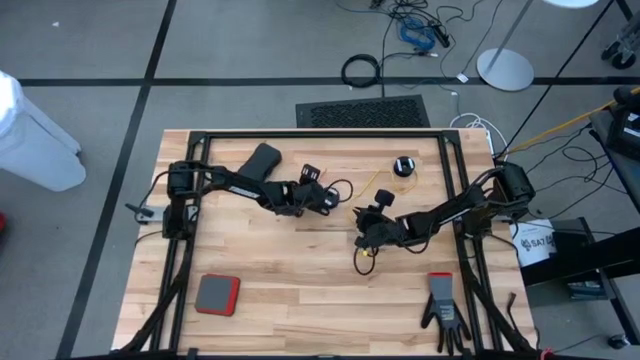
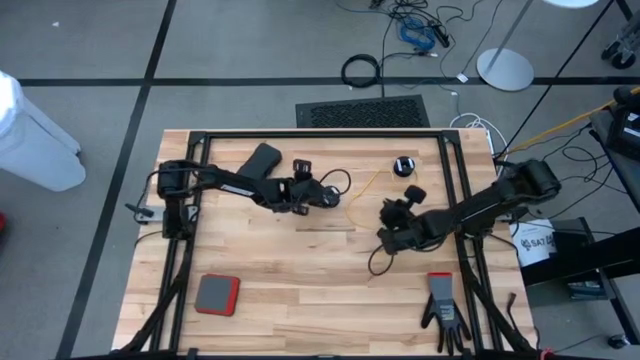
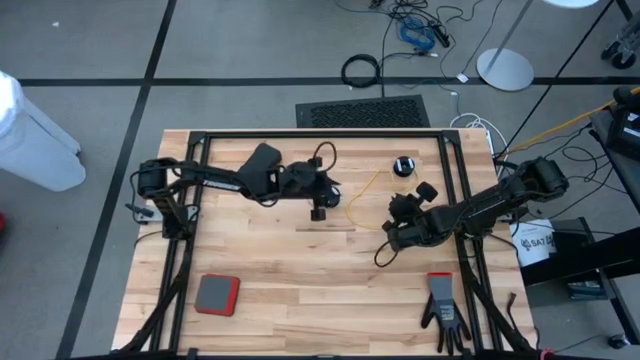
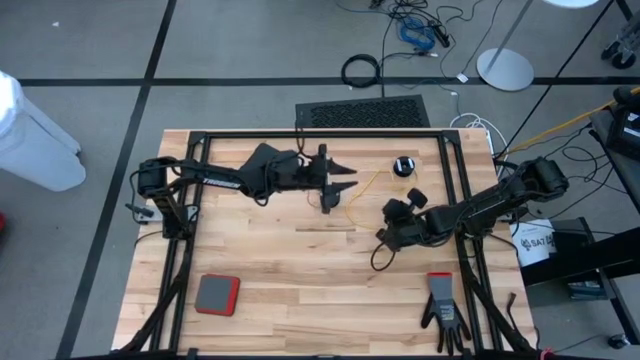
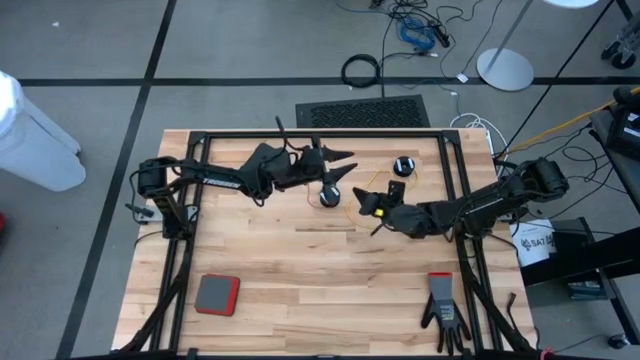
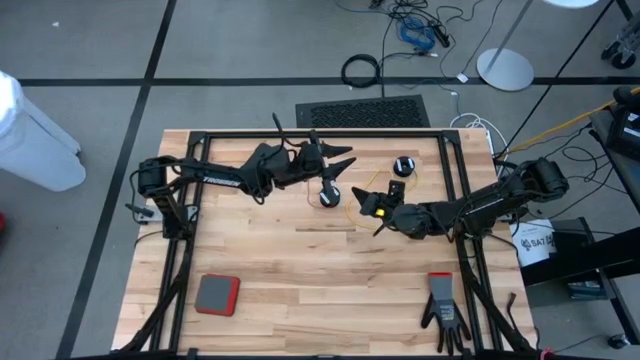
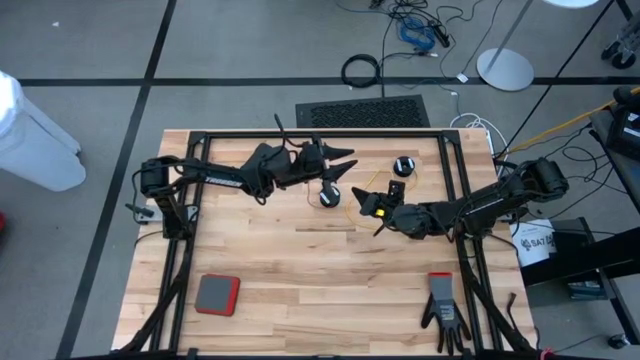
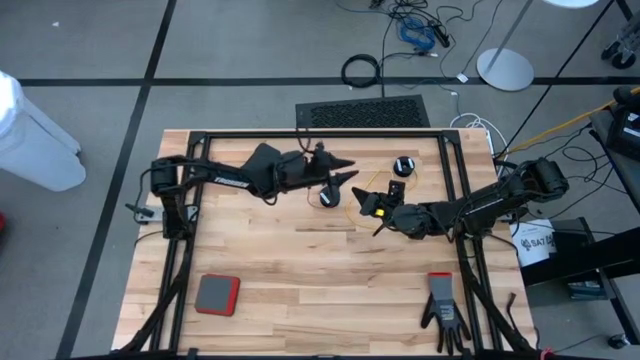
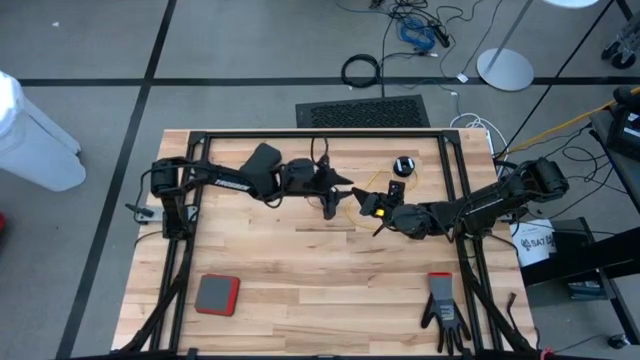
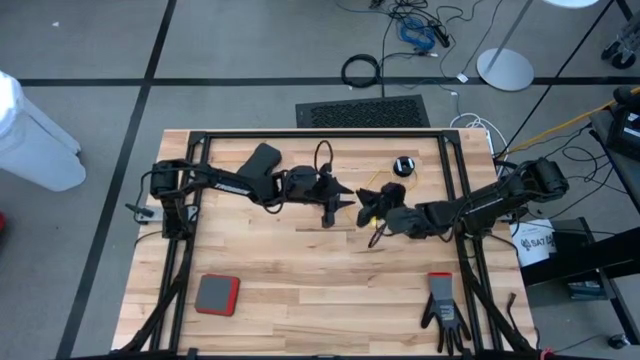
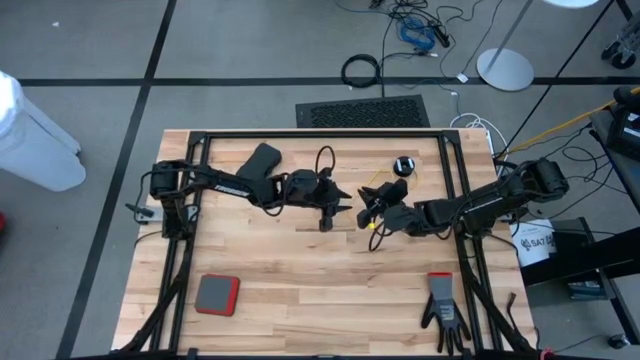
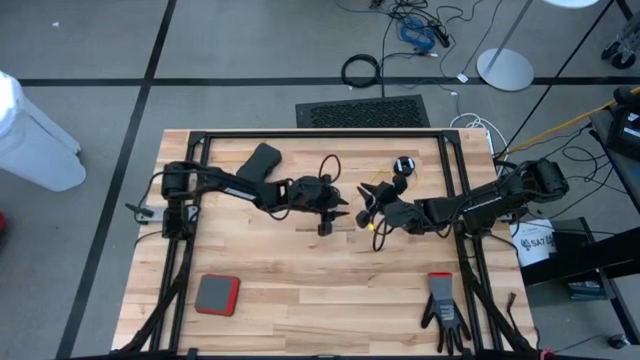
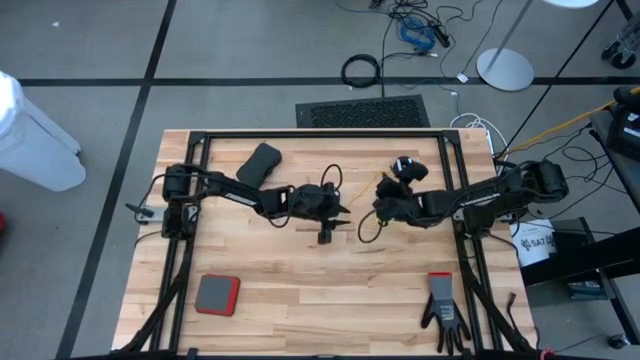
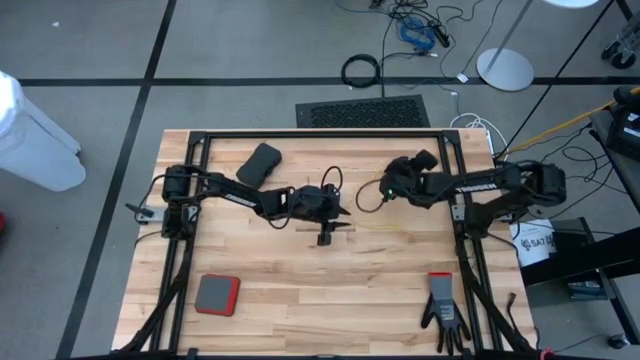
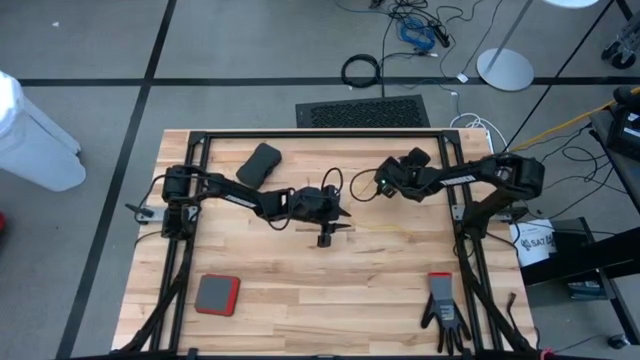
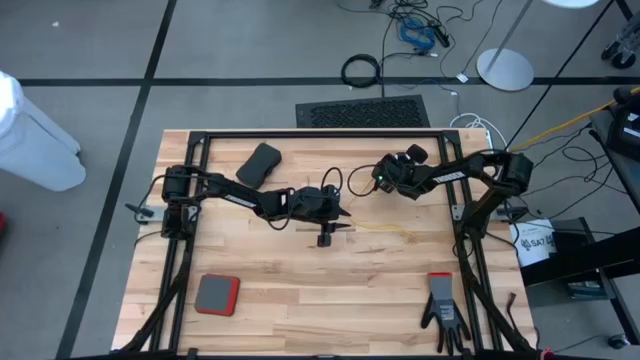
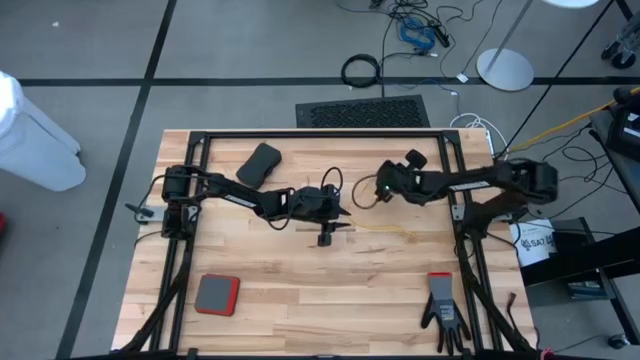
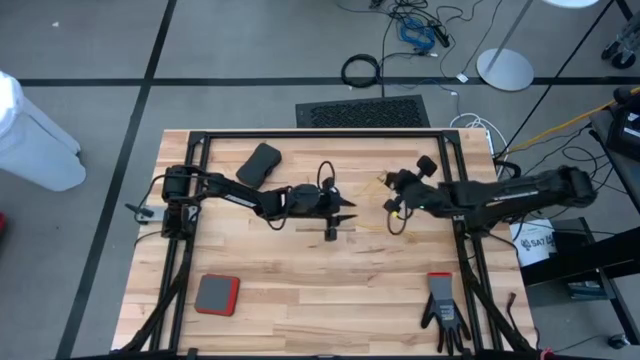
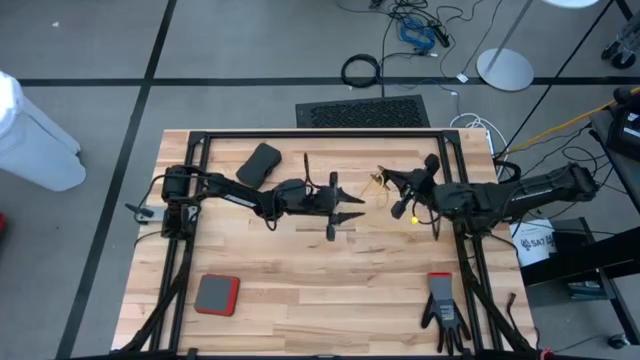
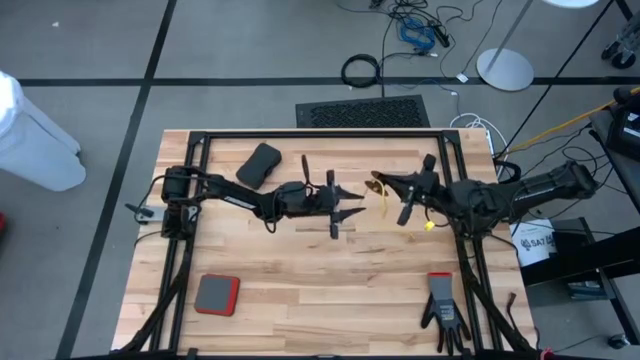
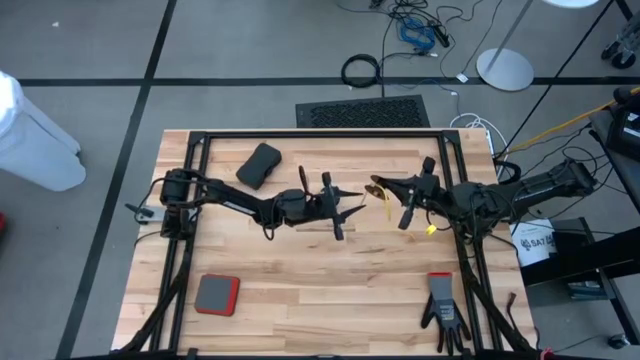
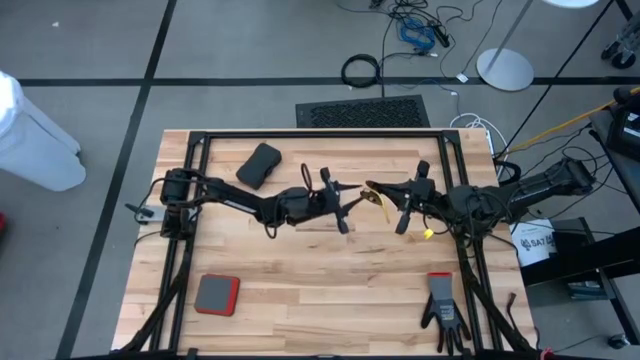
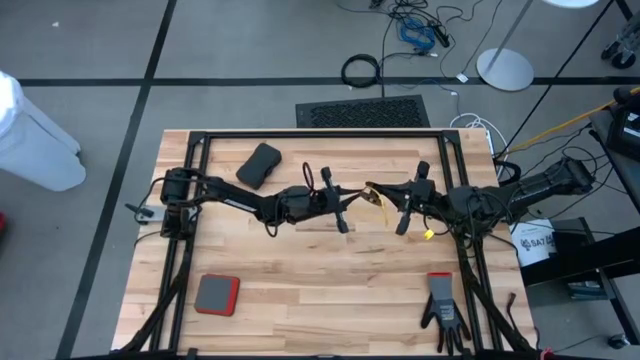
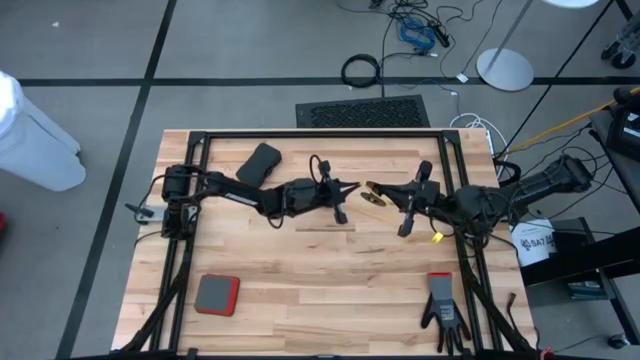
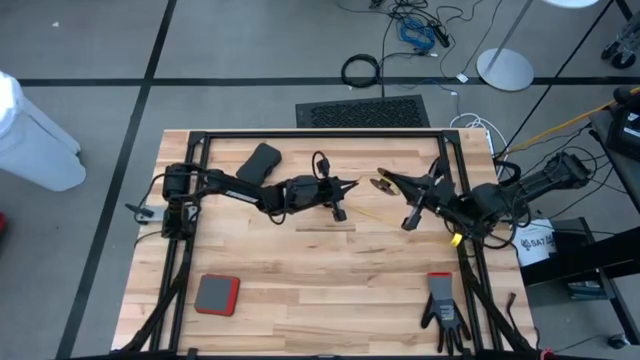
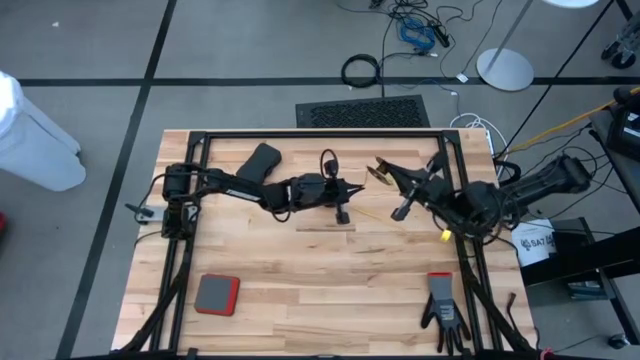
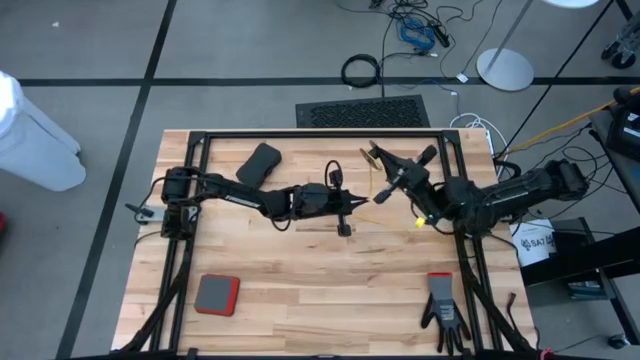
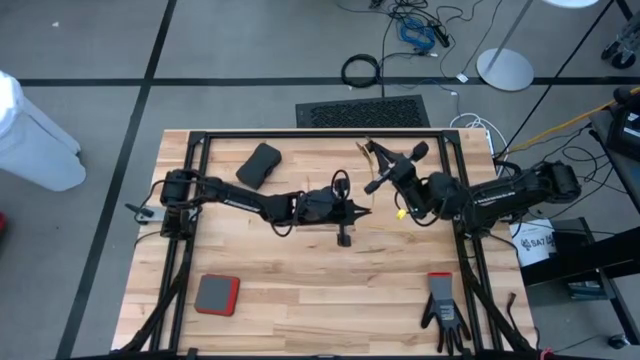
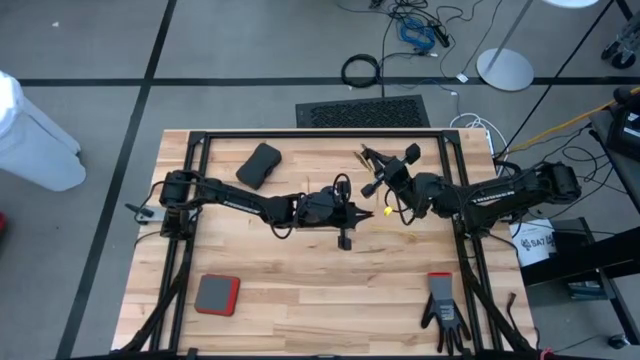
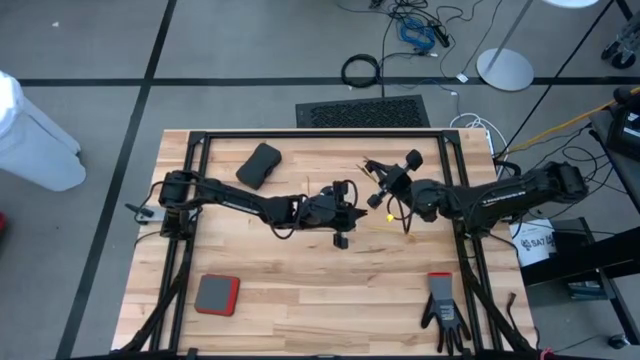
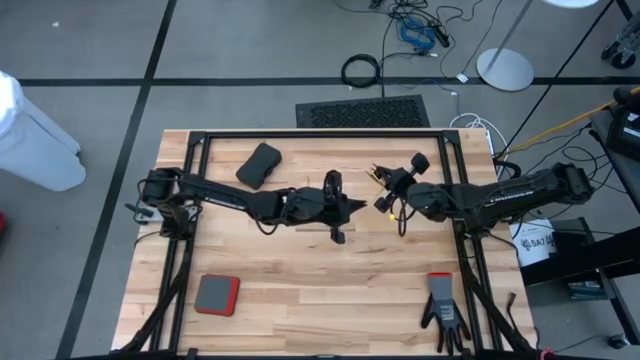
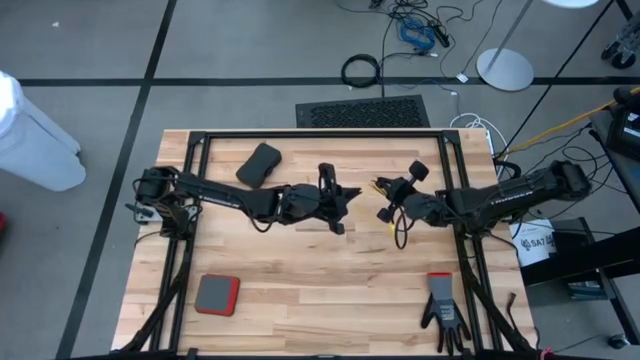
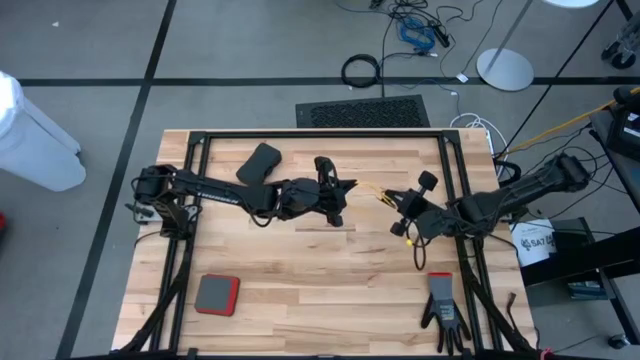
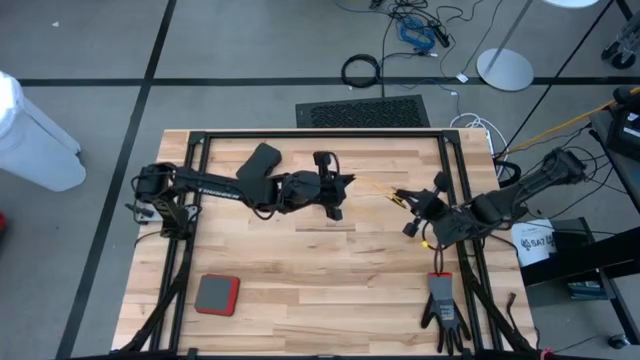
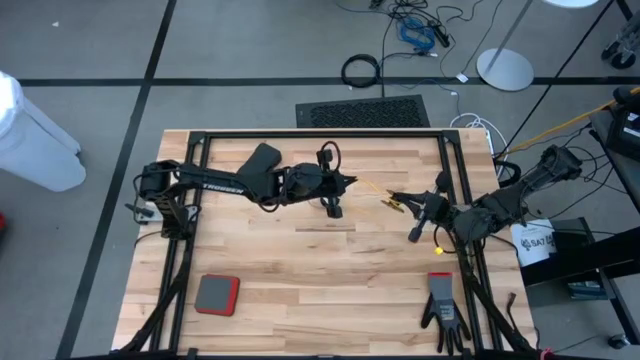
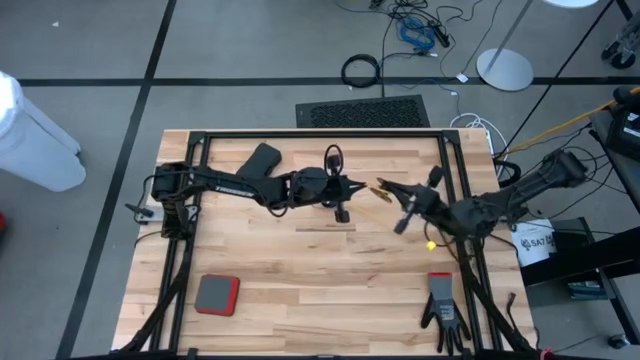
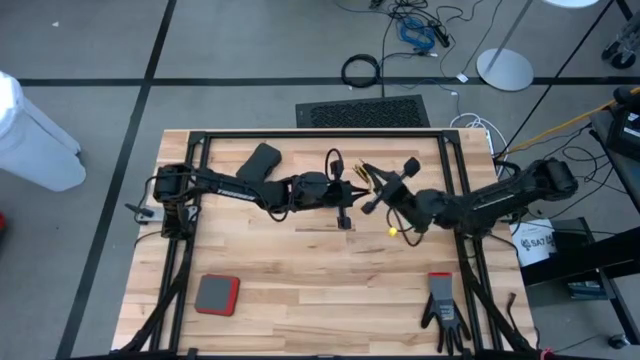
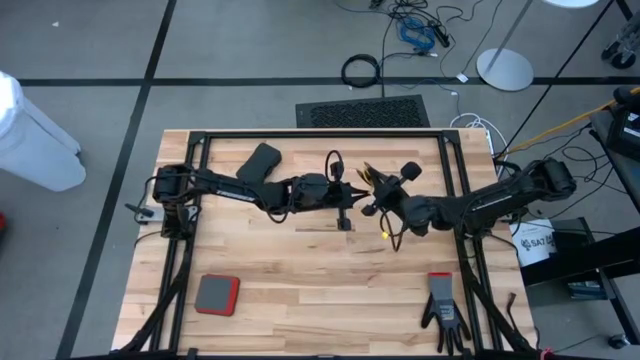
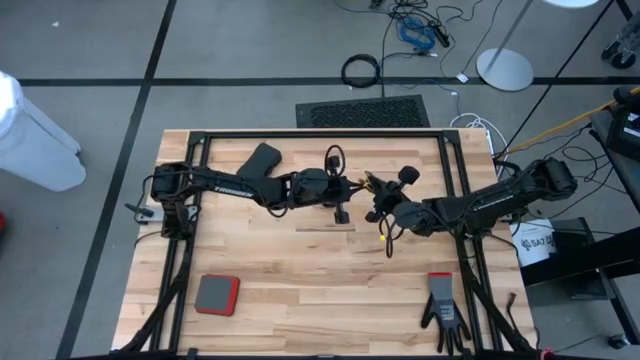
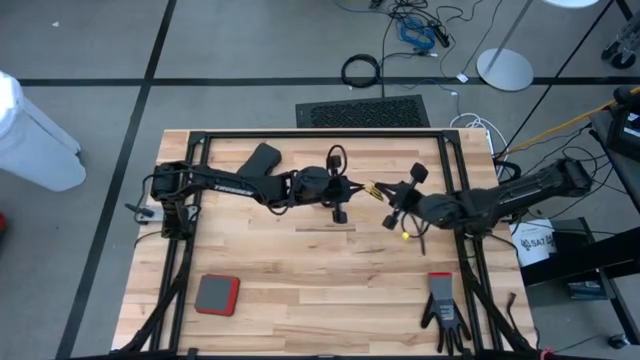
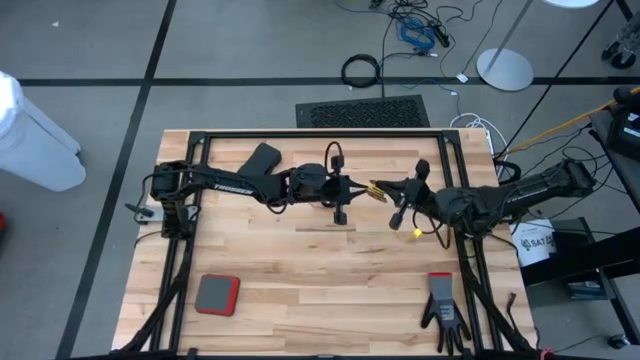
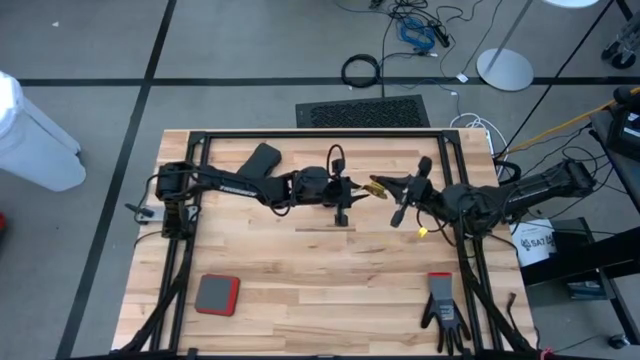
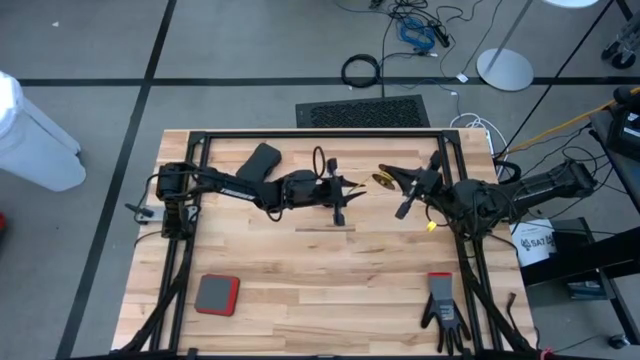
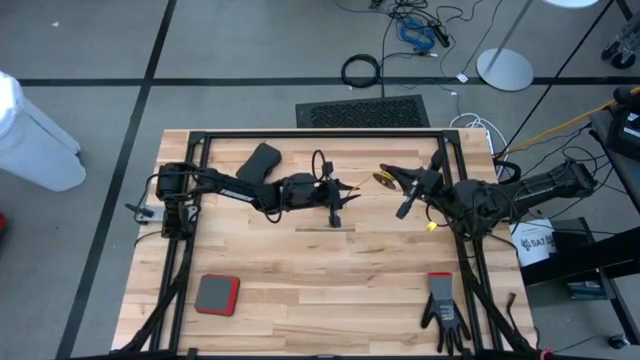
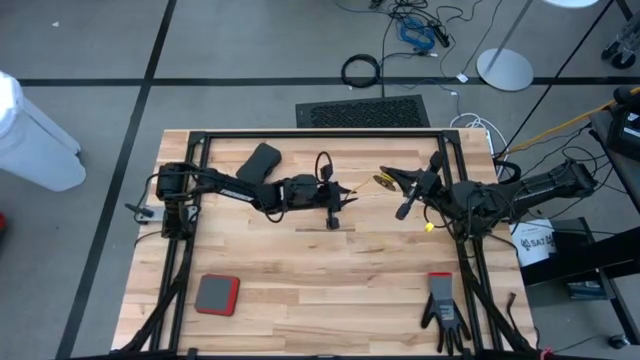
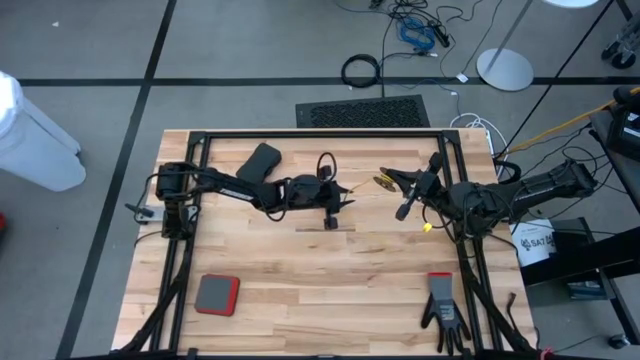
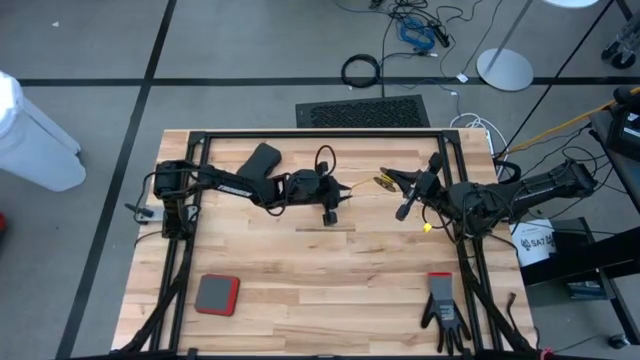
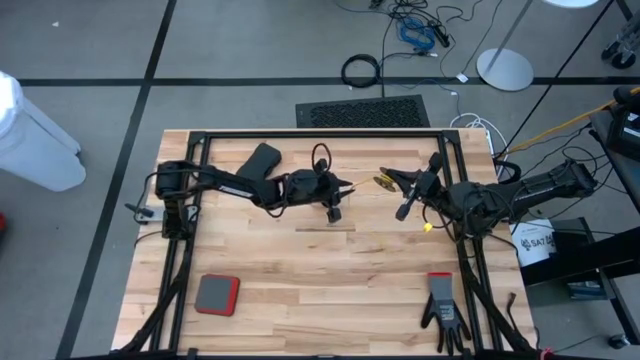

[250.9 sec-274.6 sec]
Task: Coil cords
Coil the yellow wire on the spool
